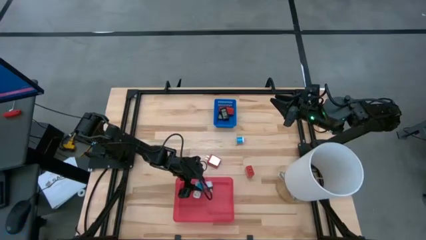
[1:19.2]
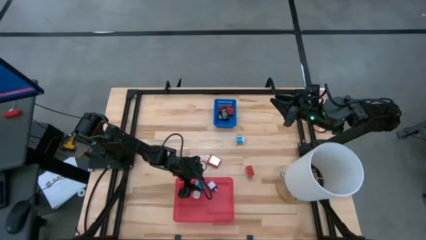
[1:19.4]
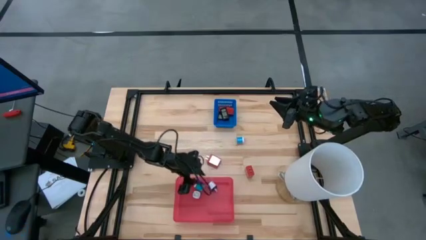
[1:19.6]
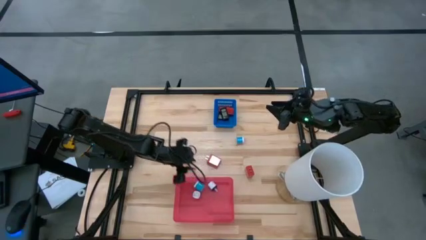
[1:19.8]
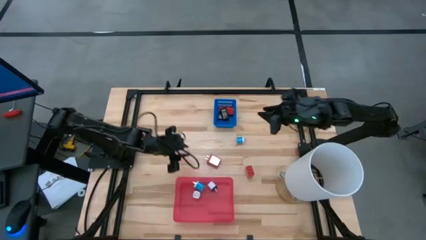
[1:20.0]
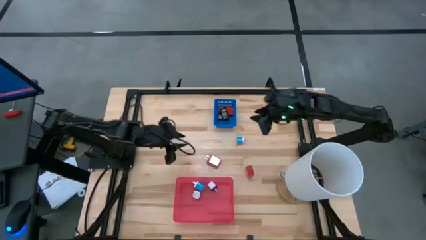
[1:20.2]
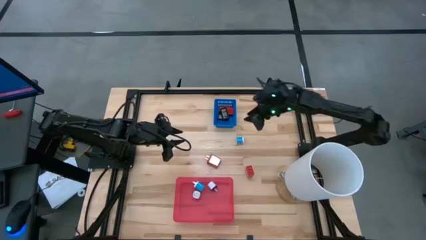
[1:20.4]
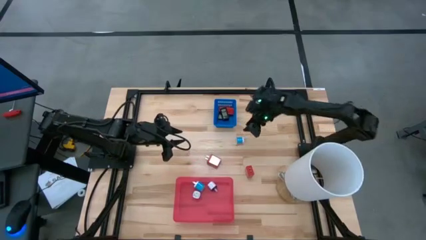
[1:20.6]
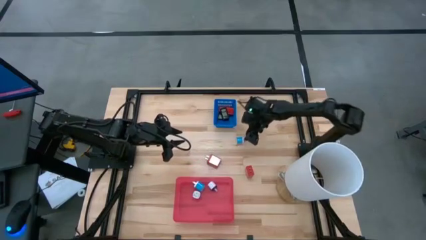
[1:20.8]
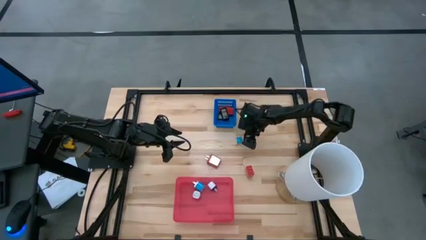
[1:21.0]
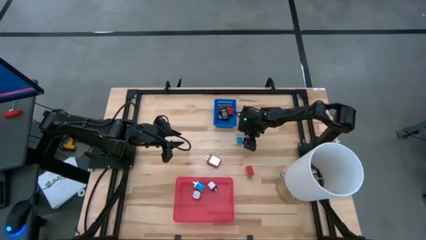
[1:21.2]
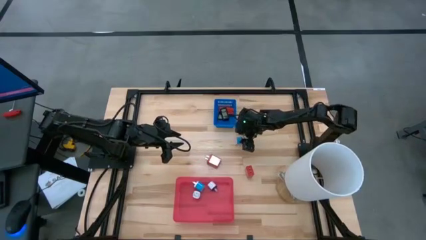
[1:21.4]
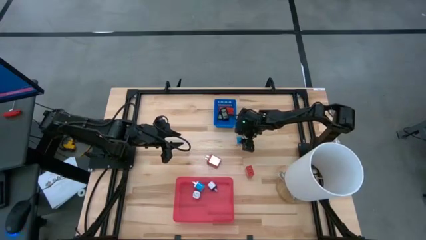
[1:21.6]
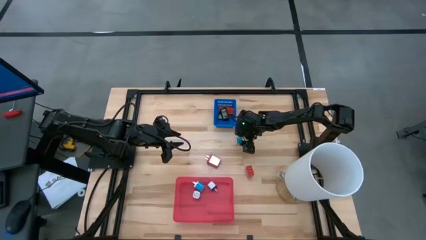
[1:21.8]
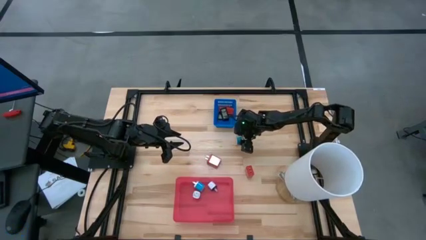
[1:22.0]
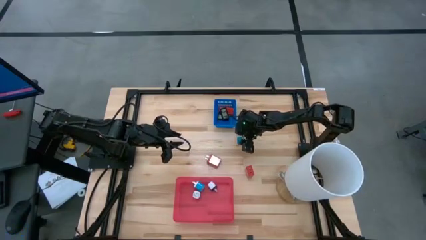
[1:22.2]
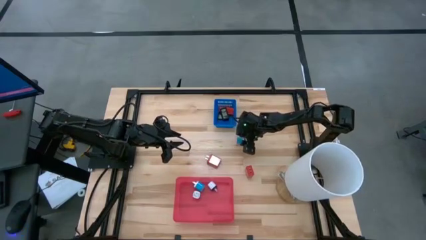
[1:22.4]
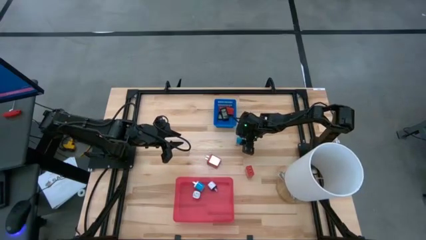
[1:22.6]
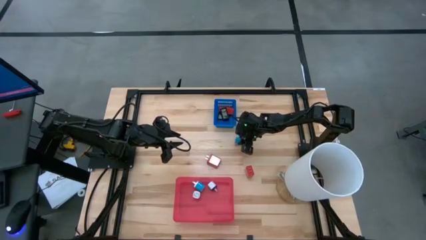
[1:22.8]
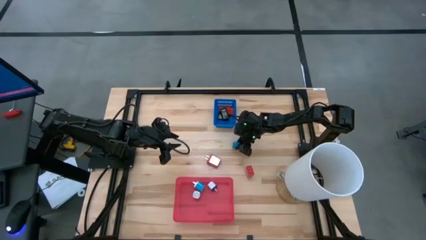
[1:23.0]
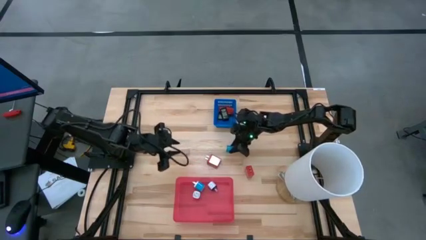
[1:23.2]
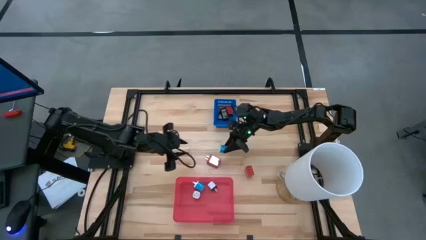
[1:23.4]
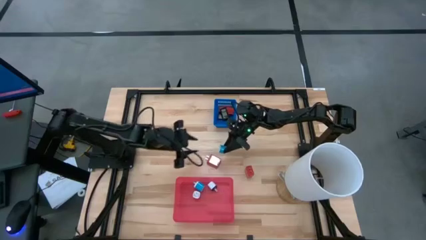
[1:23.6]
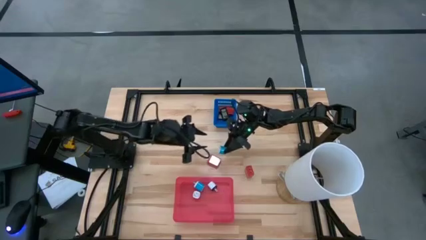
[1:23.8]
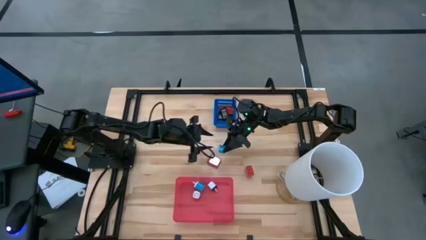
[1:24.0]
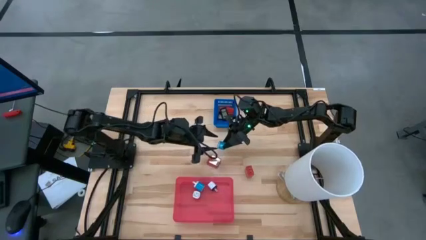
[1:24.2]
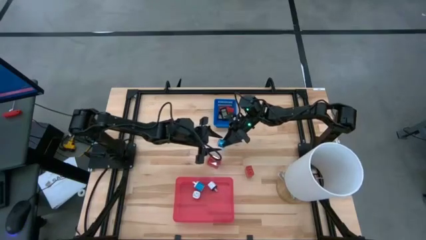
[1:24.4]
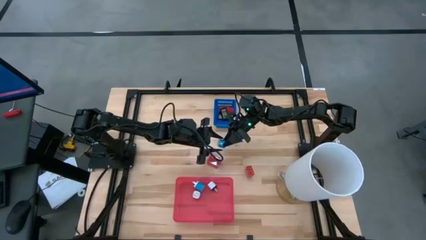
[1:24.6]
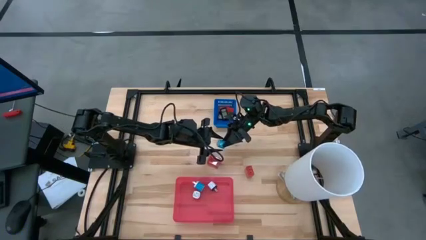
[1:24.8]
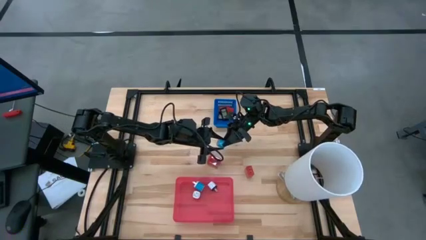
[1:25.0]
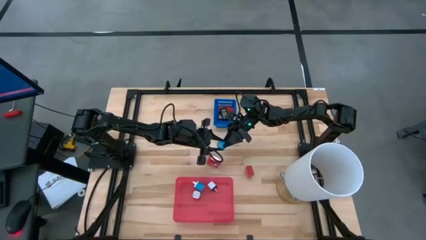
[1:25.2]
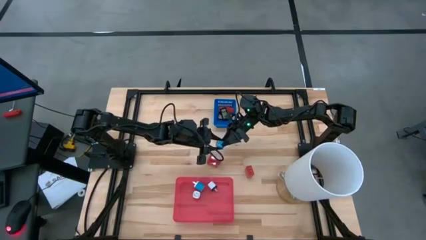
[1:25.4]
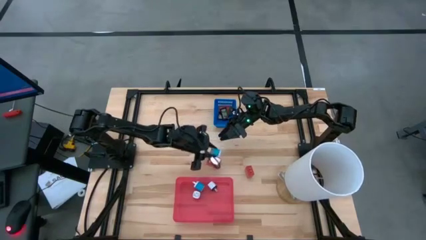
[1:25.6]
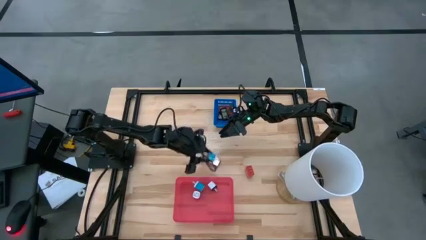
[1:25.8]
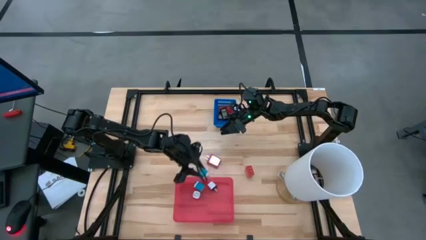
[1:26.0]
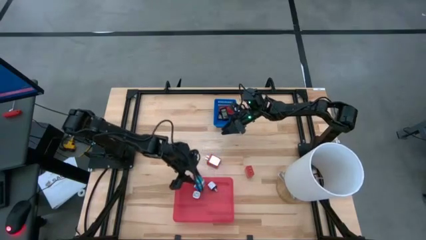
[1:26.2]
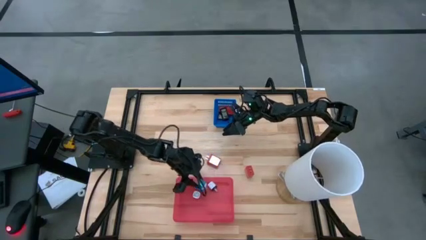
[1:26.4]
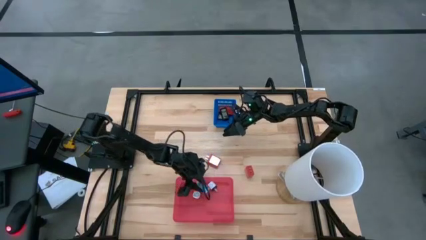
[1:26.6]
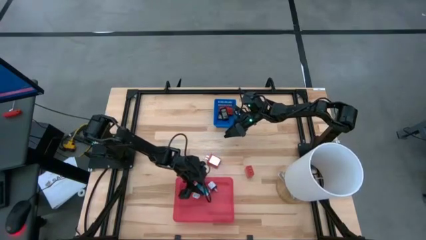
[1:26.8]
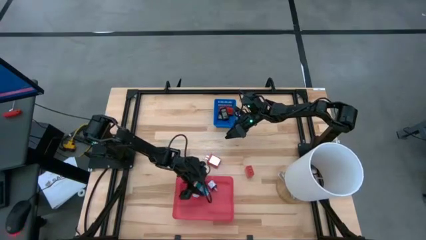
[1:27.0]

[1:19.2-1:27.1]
Task: Pick & Place Office items
Put the blue charger adapter into the red bin

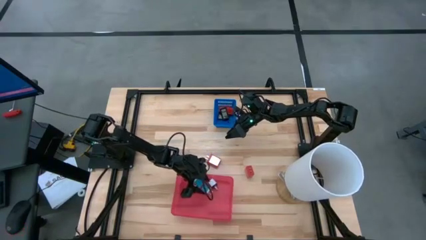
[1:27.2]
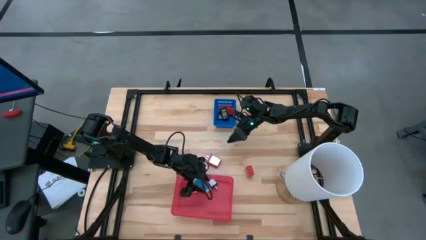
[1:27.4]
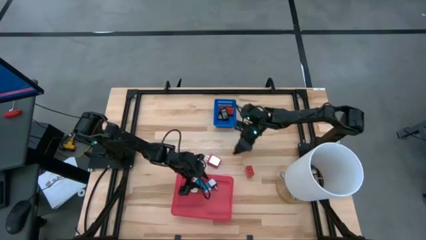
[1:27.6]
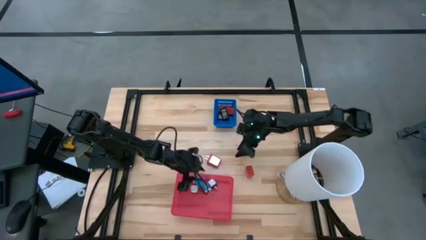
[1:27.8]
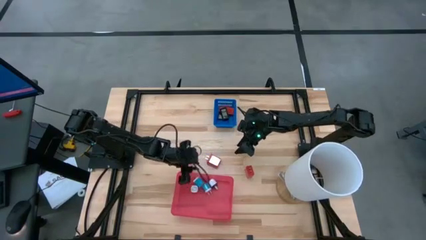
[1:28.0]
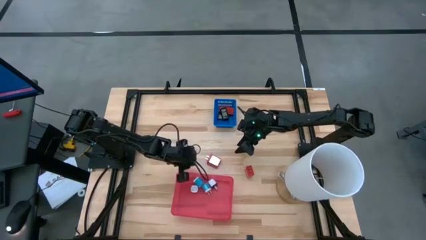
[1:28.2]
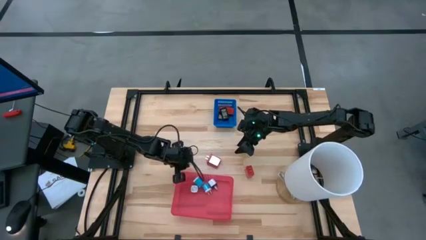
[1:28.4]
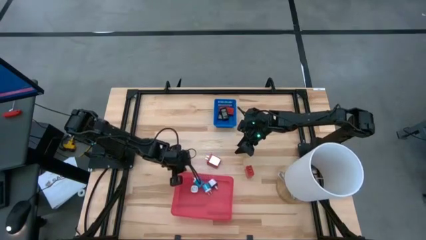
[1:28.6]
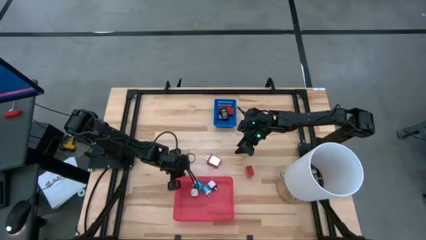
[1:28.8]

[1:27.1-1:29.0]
Adjust the red bin

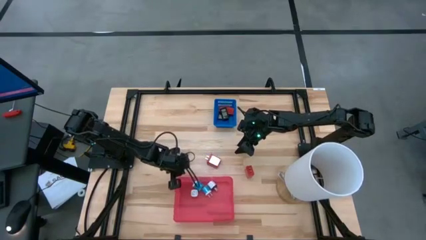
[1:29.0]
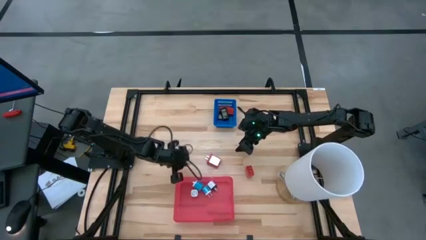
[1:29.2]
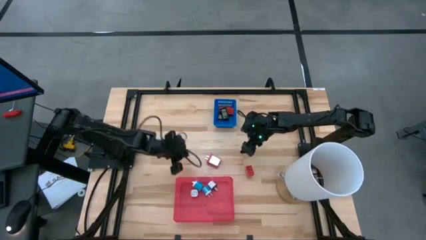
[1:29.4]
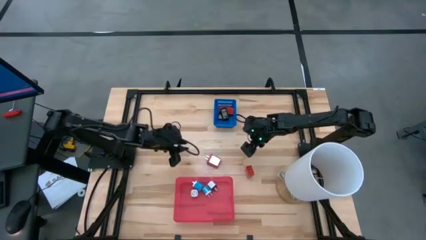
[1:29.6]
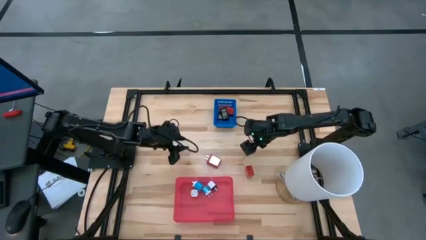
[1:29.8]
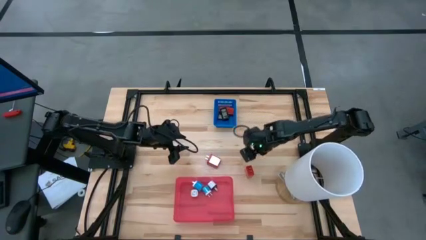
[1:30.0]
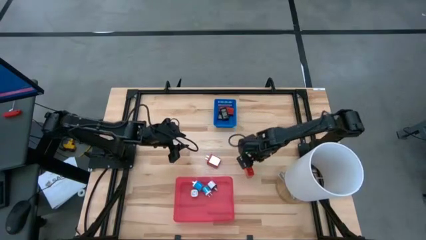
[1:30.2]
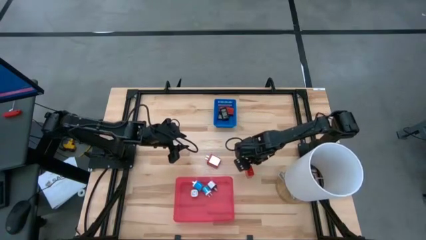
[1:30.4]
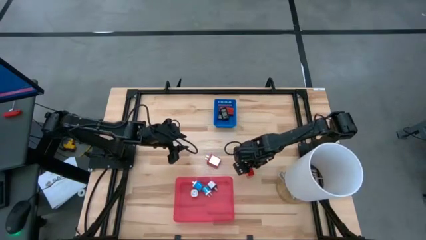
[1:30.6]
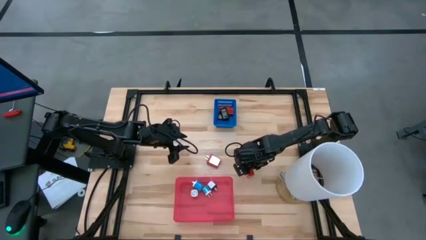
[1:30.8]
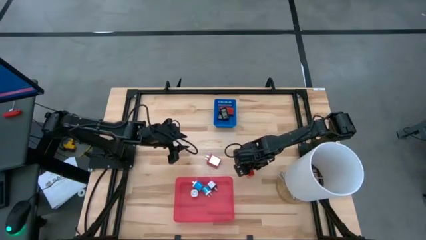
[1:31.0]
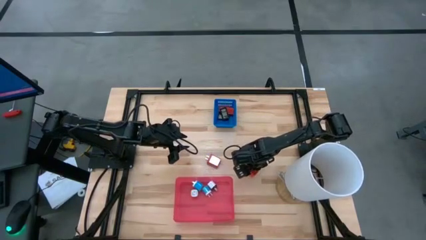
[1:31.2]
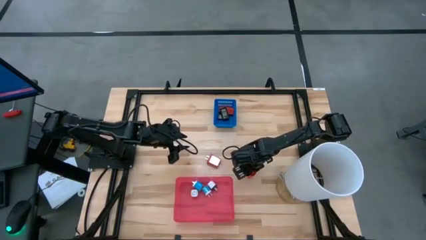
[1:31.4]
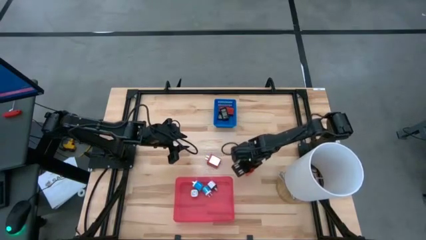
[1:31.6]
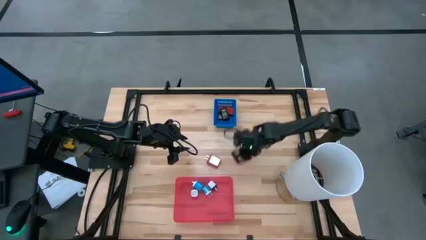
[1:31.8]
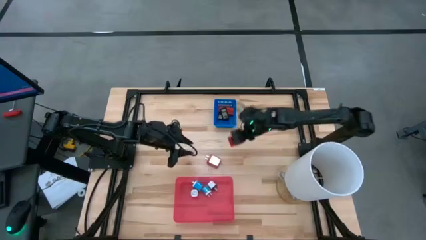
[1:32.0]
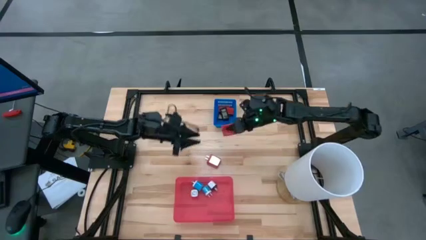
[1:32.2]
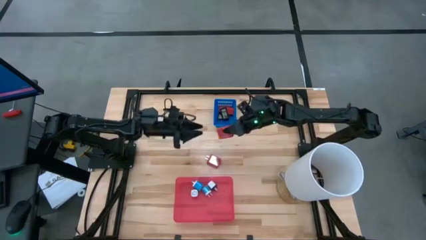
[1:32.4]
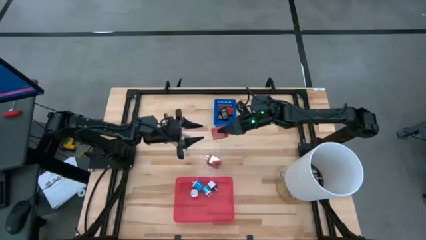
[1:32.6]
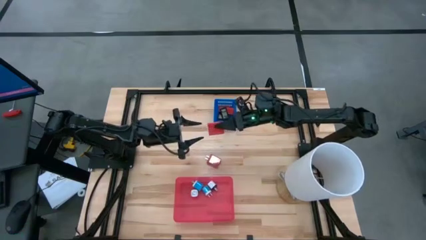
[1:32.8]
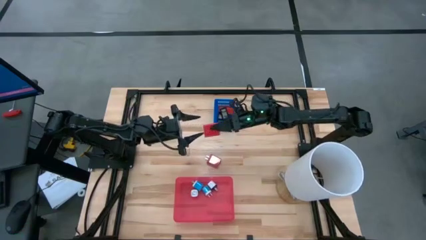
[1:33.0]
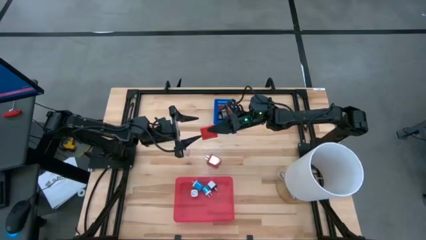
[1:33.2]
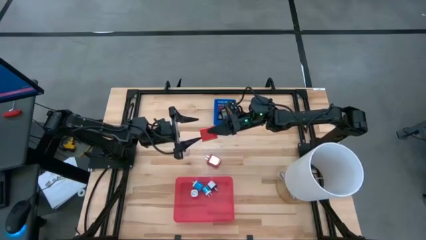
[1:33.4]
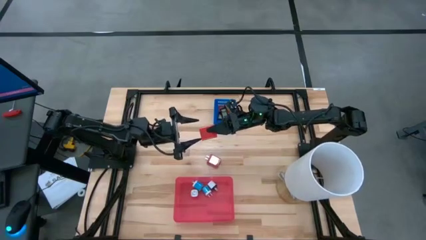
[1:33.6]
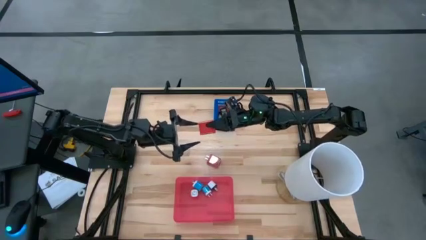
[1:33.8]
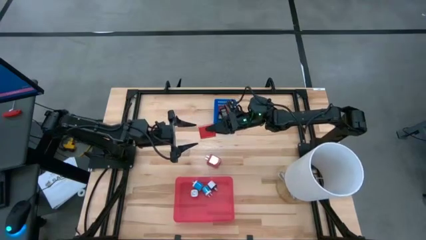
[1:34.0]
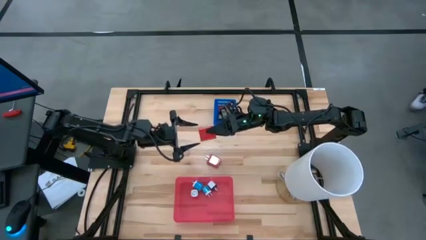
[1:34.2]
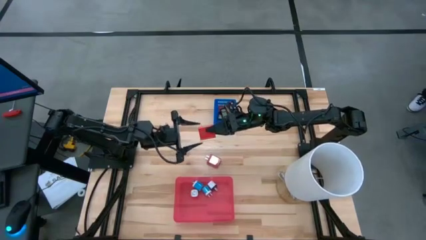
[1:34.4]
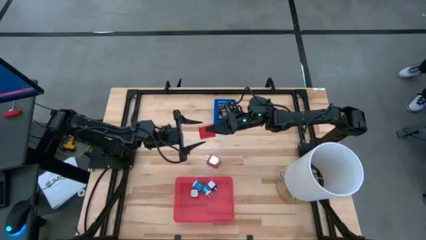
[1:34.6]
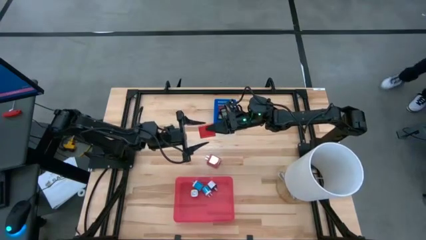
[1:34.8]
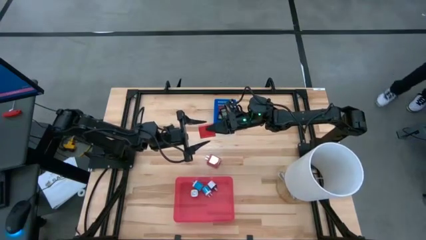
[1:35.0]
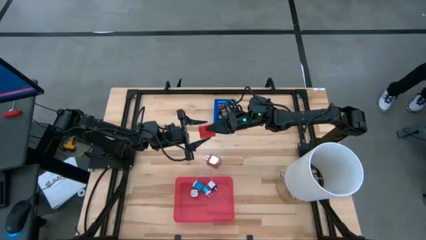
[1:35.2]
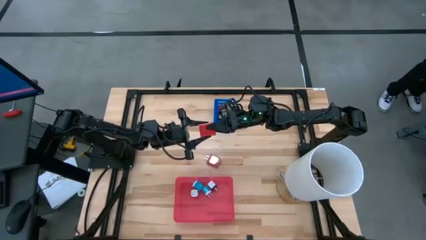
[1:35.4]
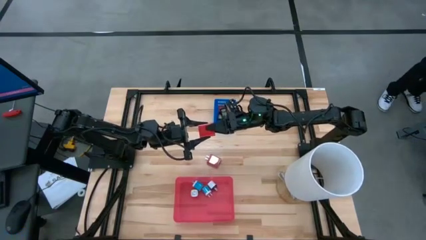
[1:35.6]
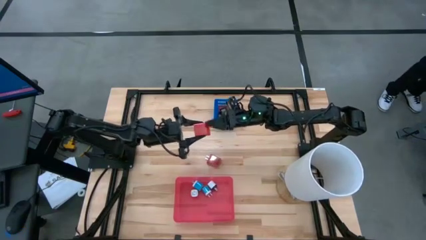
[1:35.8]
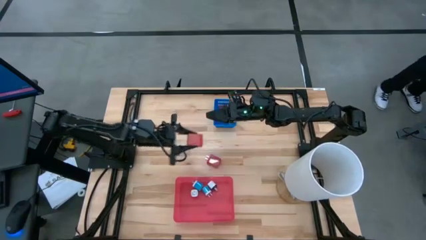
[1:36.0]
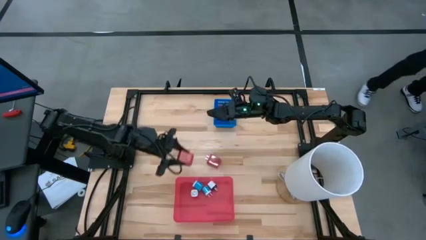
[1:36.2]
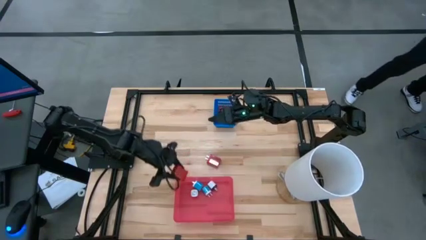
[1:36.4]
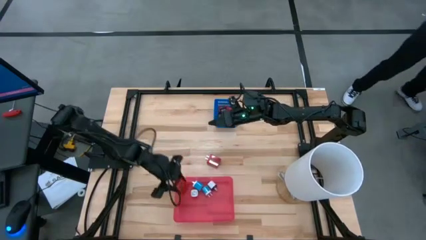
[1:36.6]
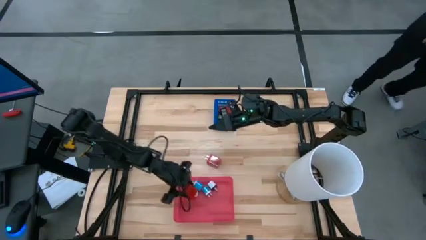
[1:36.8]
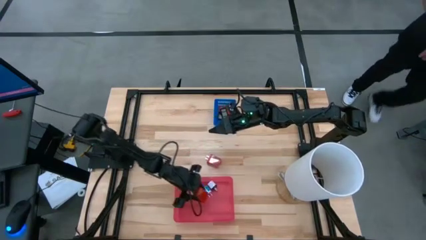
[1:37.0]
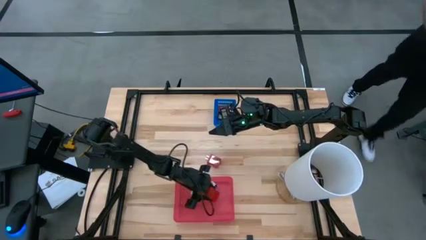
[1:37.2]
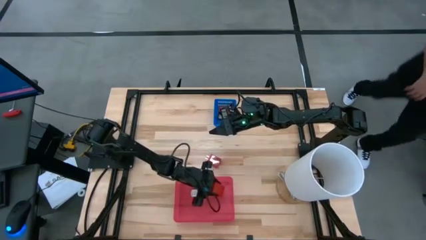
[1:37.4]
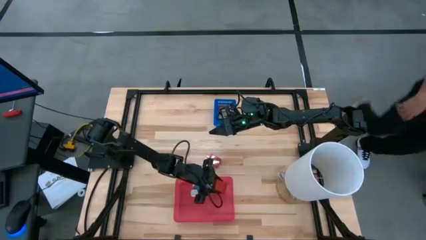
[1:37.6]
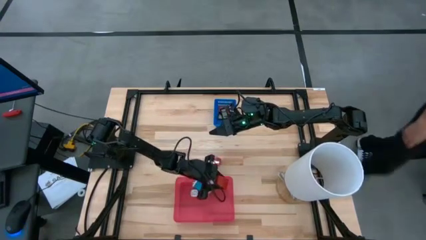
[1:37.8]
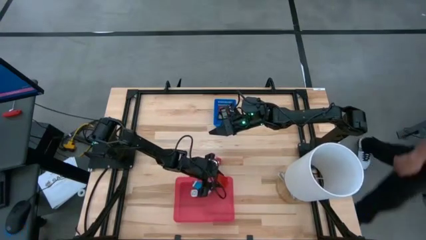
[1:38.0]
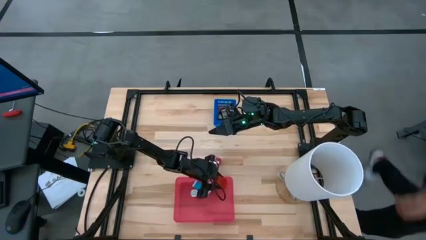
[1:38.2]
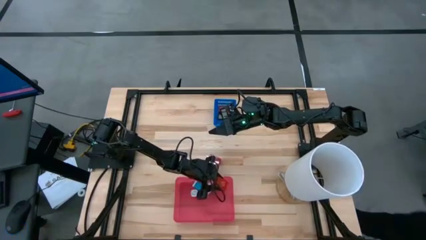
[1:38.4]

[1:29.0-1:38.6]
Put the bottom red charger adapter into the red bin
